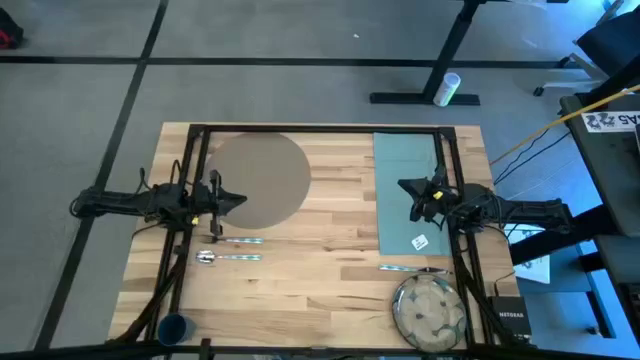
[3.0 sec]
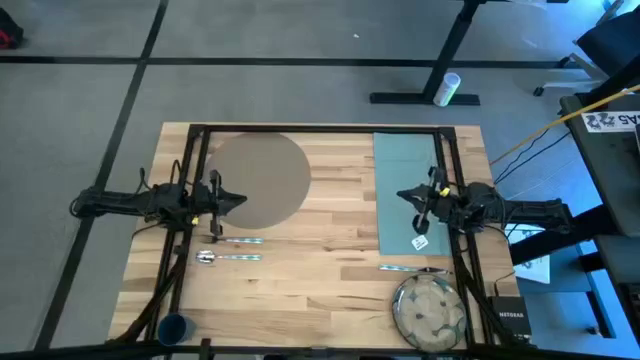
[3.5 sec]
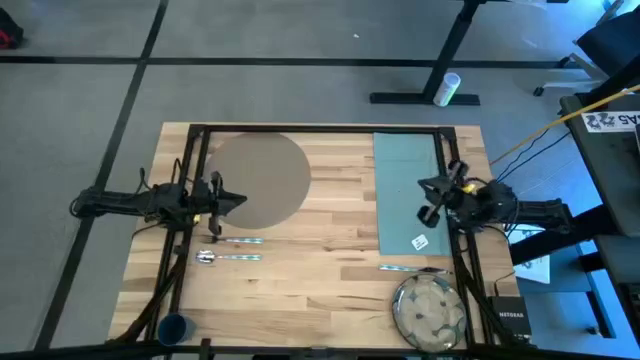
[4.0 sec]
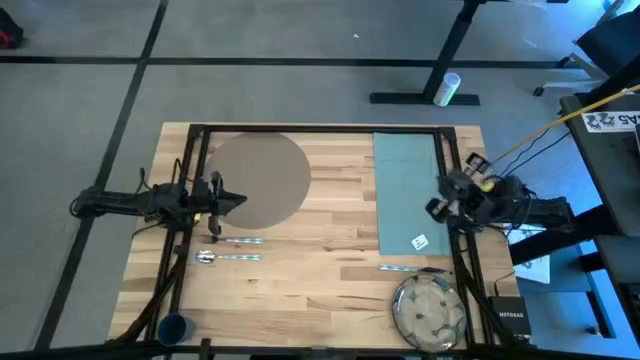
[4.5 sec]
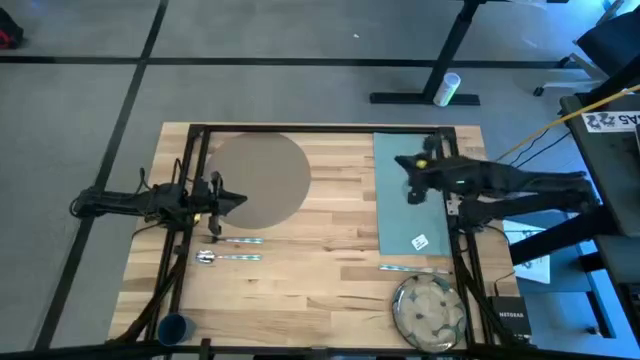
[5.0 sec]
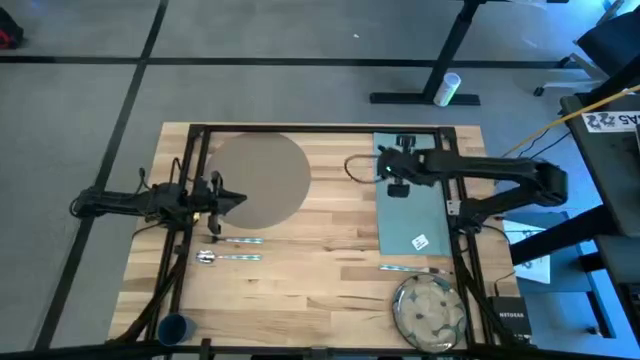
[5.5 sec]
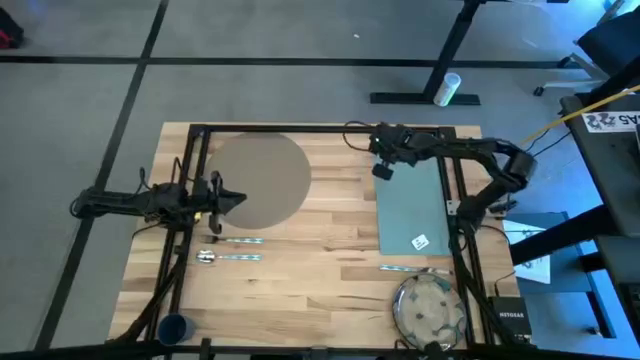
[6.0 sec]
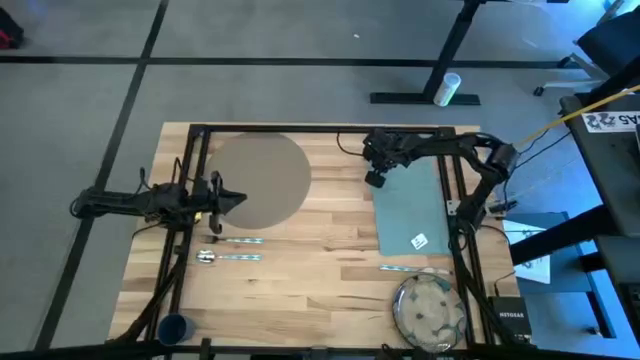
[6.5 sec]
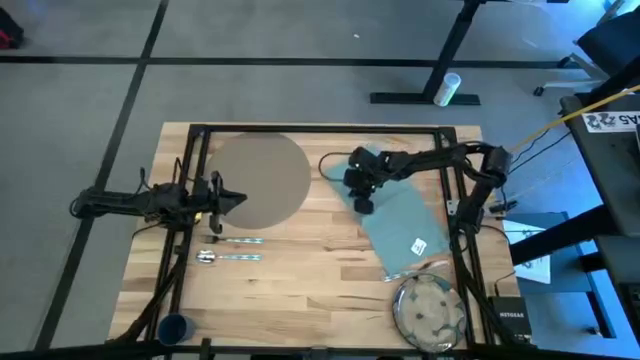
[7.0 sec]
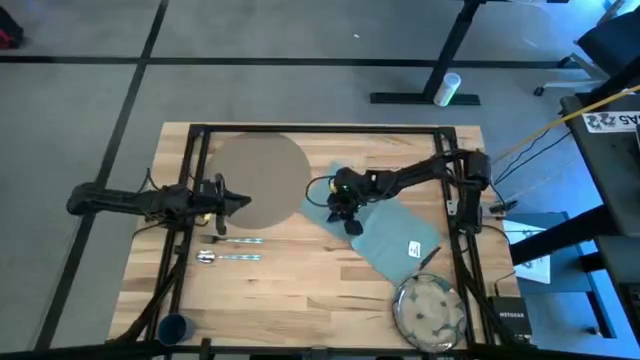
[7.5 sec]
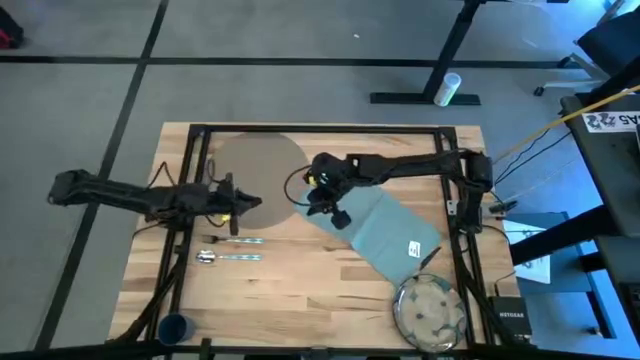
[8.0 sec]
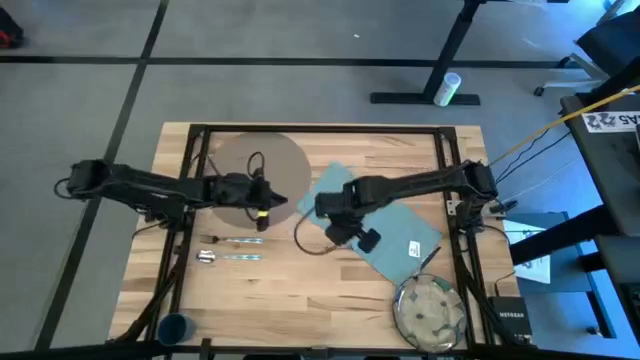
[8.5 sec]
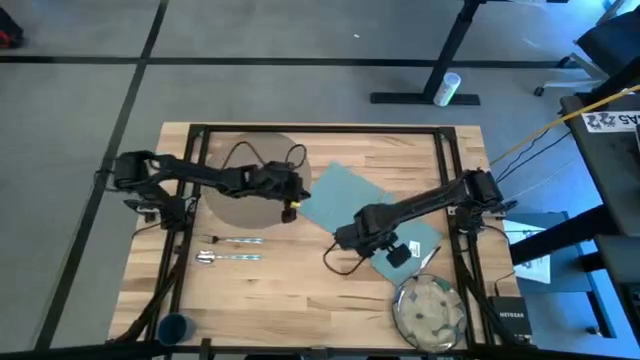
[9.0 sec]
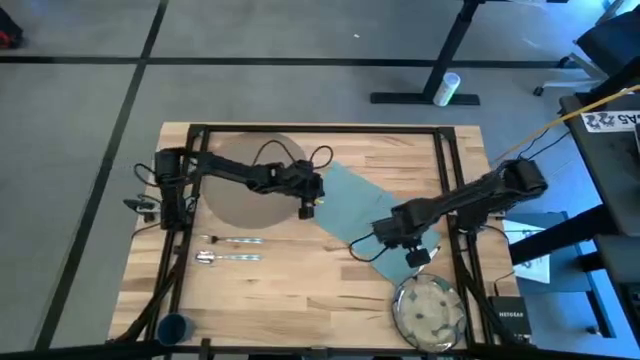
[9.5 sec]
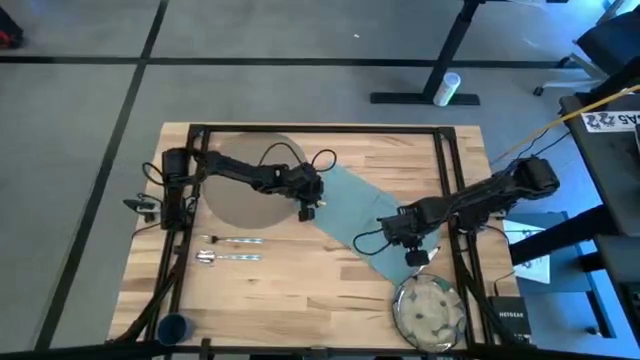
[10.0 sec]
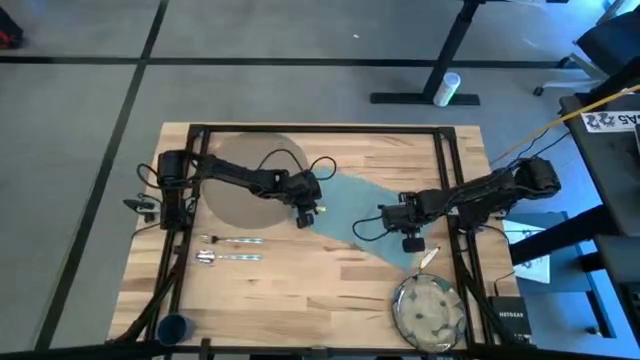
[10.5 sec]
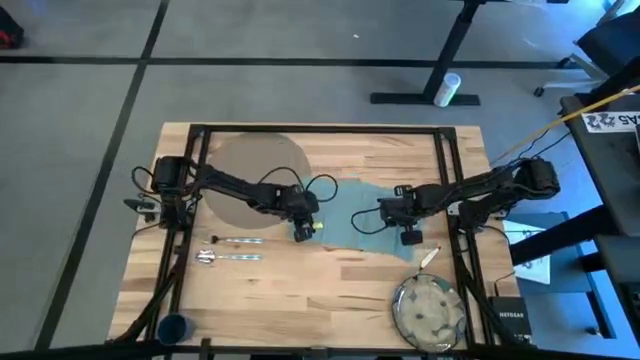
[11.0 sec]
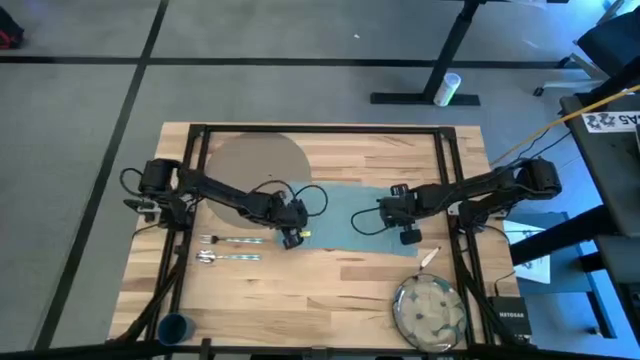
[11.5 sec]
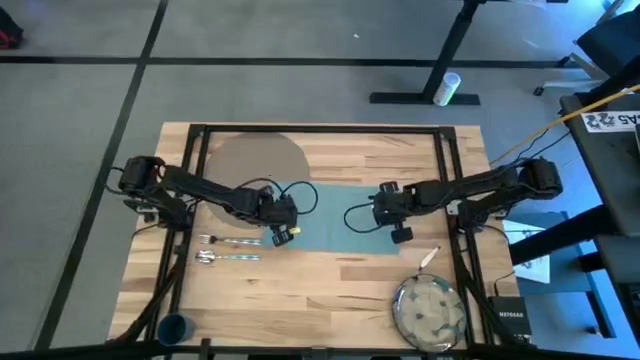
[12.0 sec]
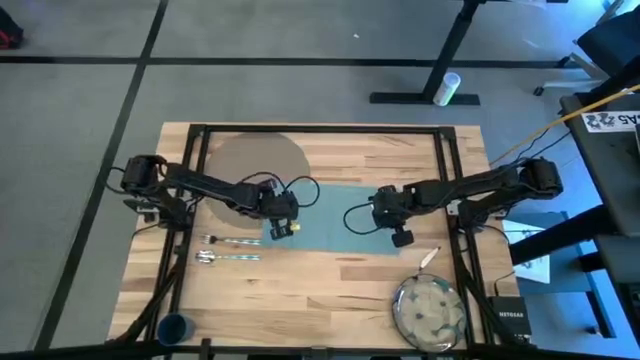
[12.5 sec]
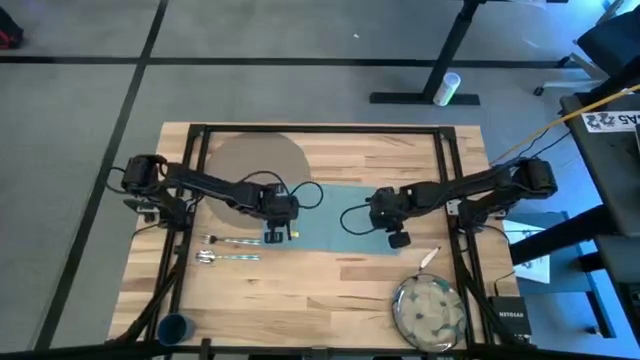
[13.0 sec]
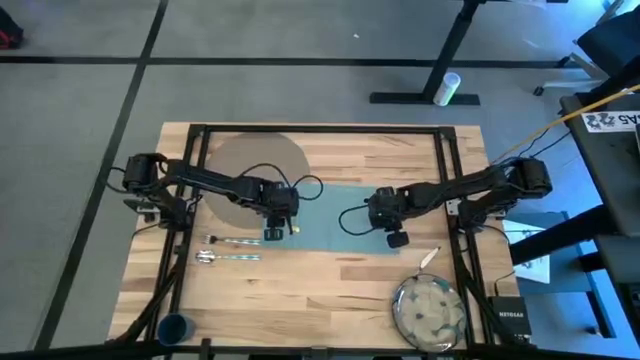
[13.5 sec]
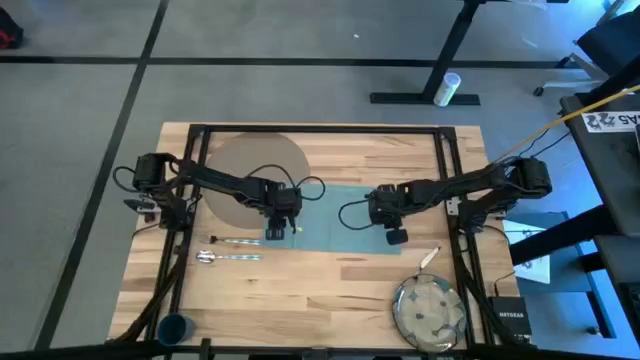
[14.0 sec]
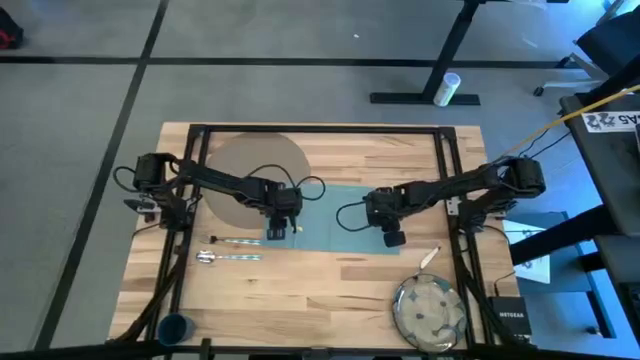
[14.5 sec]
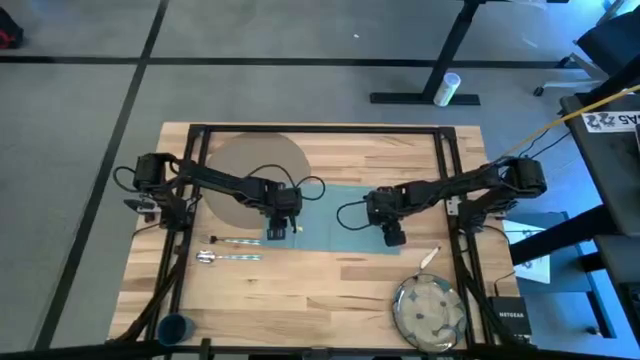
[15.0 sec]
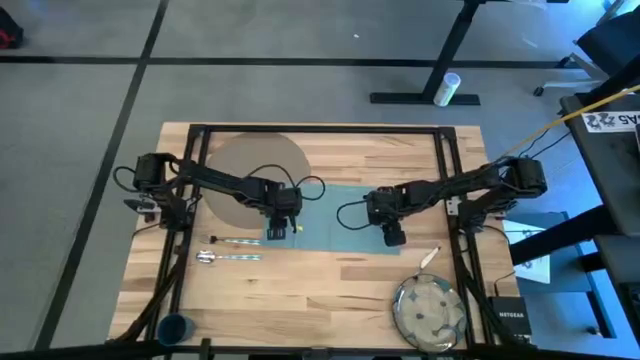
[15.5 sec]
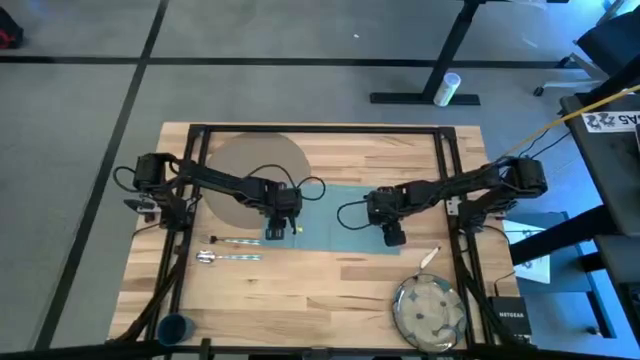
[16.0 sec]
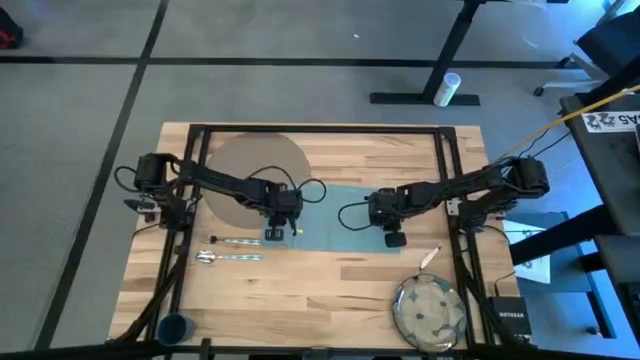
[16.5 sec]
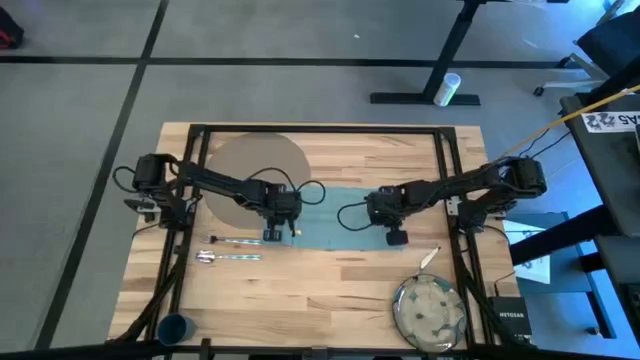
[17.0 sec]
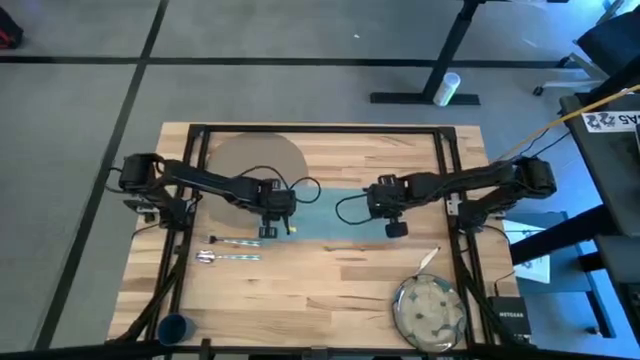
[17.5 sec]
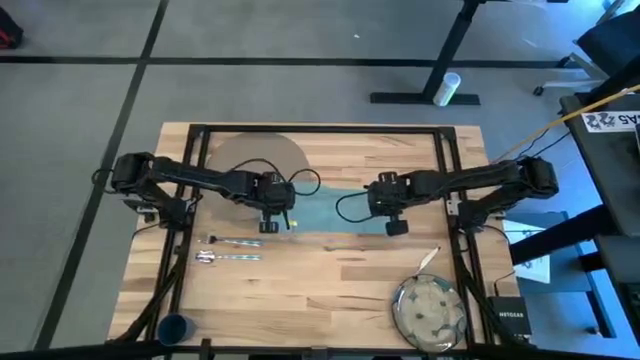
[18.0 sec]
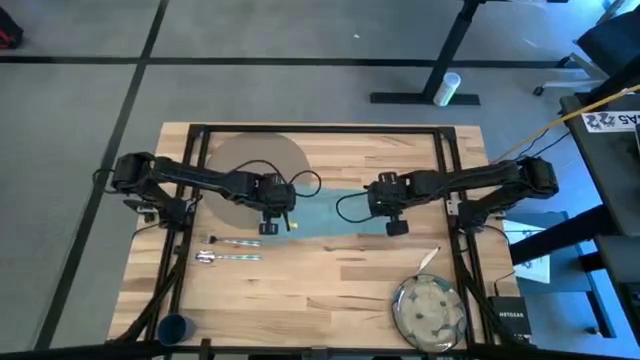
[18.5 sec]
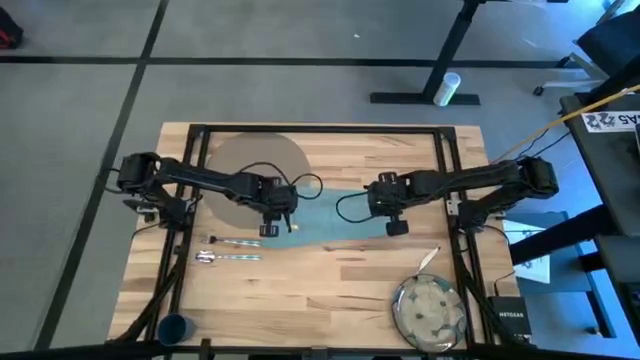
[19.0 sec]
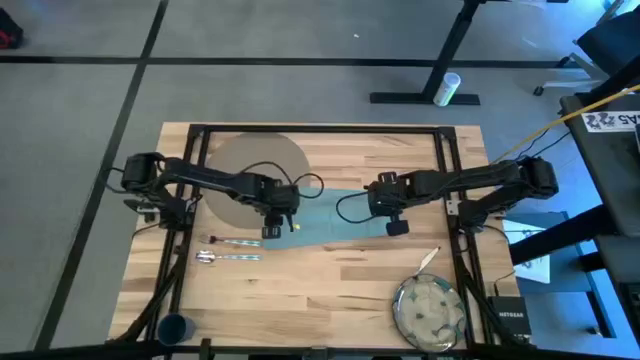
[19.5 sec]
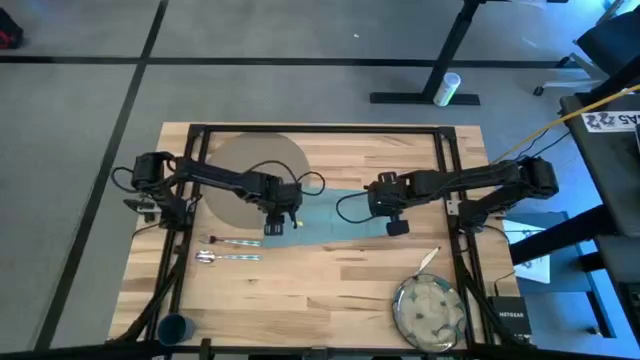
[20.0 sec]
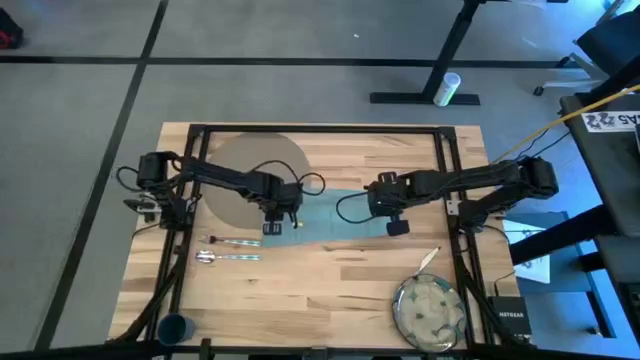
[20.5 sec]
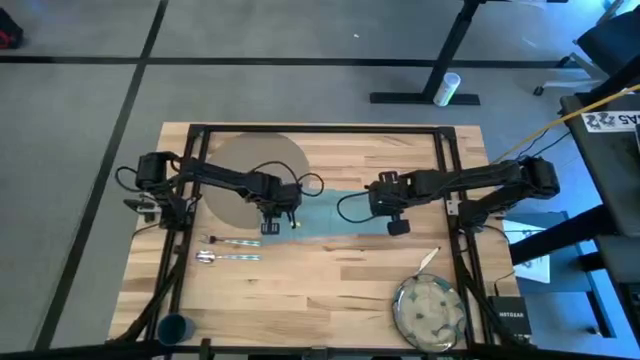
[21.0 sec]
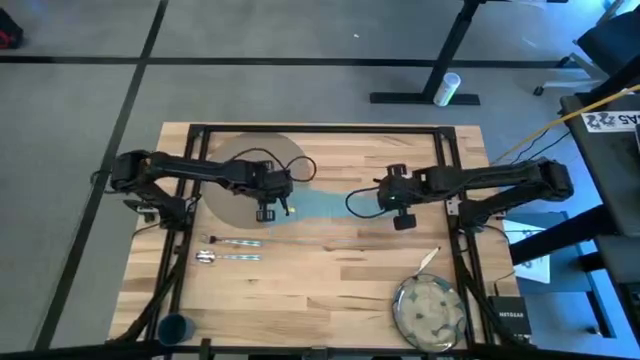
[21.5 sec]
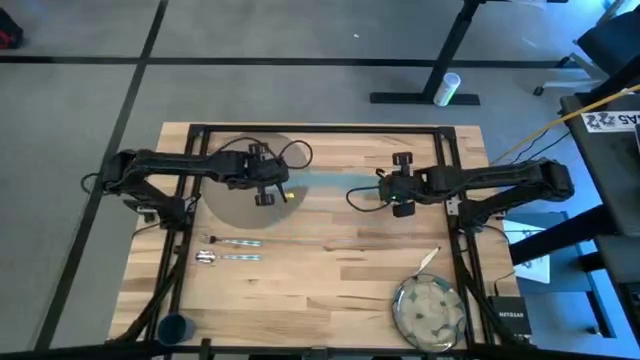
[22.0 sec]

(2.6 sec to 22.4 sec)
Task: Set table place
Fold the blue table napkin

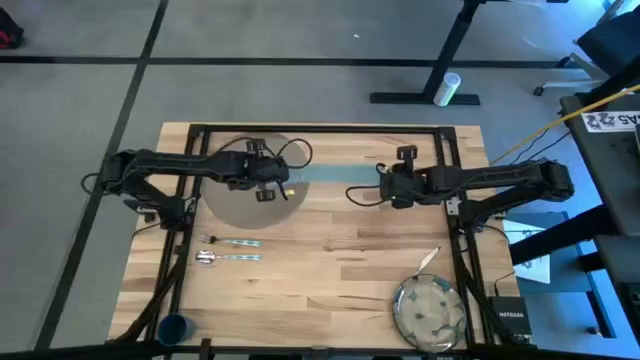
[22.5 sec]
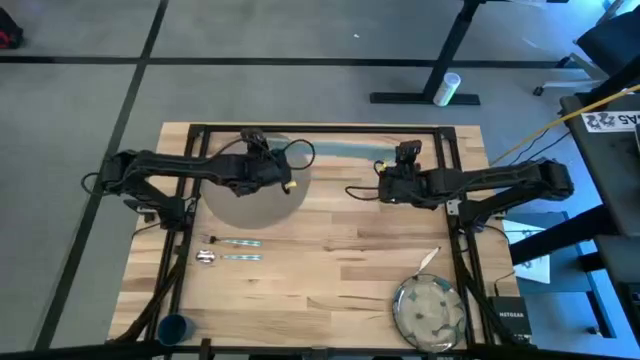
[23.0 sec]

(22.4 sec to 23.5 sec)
Fold the blue table napkin
